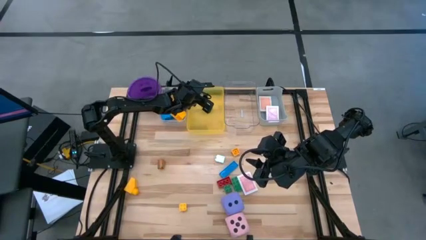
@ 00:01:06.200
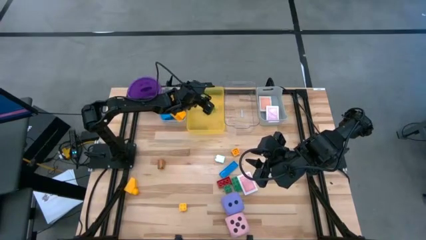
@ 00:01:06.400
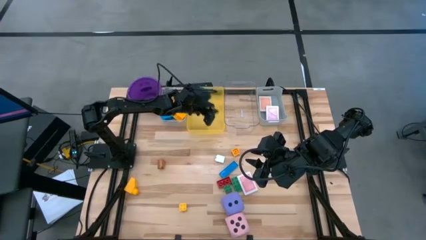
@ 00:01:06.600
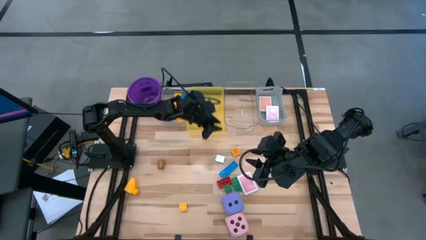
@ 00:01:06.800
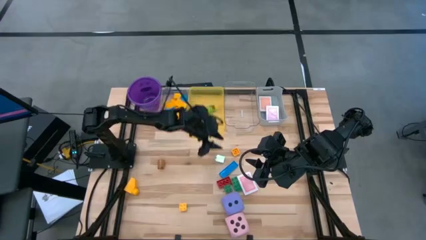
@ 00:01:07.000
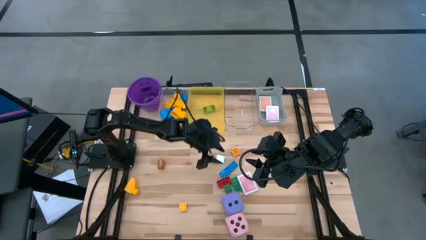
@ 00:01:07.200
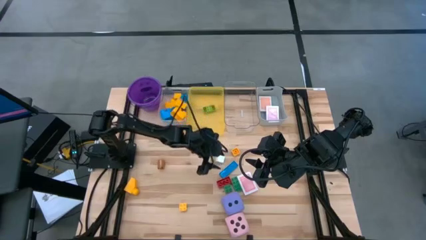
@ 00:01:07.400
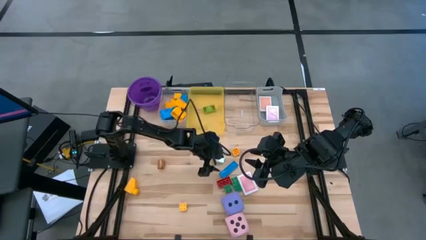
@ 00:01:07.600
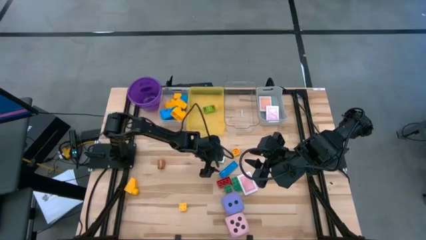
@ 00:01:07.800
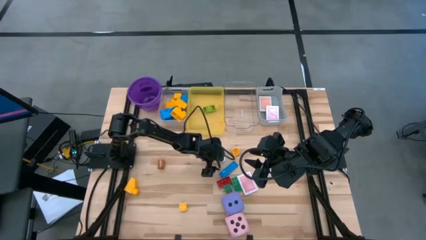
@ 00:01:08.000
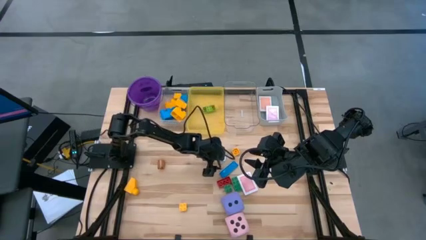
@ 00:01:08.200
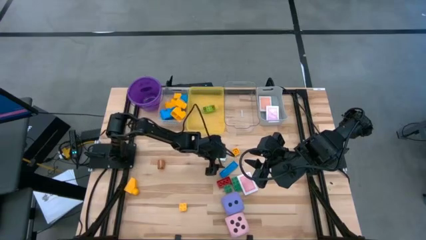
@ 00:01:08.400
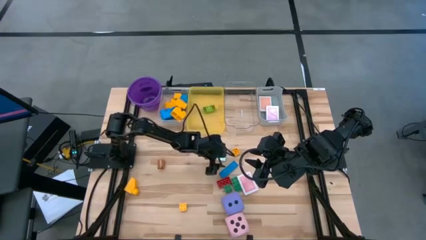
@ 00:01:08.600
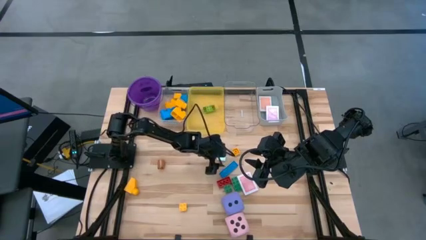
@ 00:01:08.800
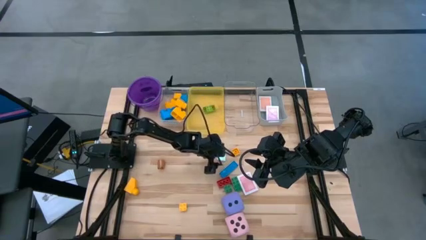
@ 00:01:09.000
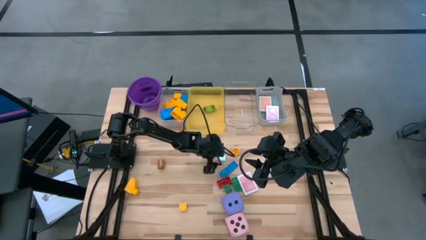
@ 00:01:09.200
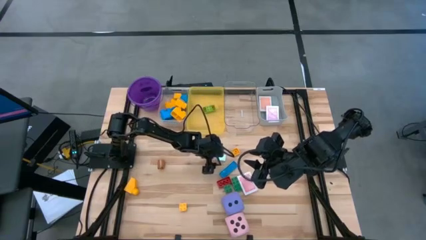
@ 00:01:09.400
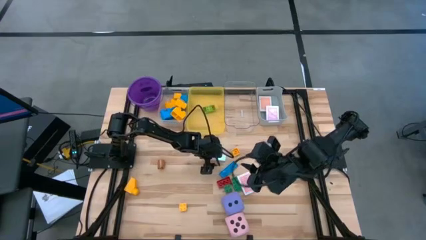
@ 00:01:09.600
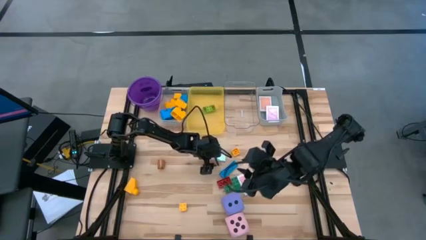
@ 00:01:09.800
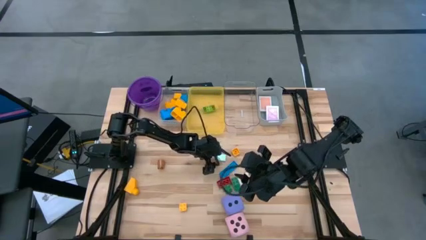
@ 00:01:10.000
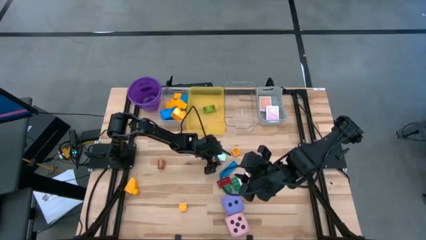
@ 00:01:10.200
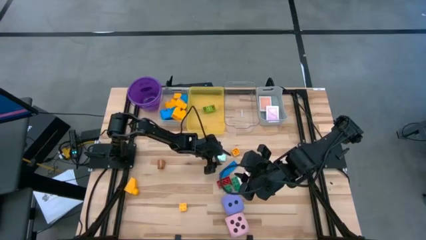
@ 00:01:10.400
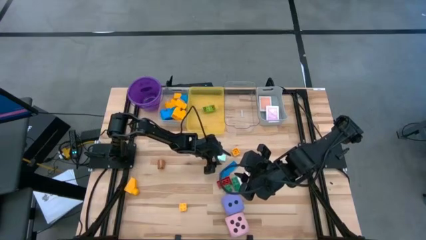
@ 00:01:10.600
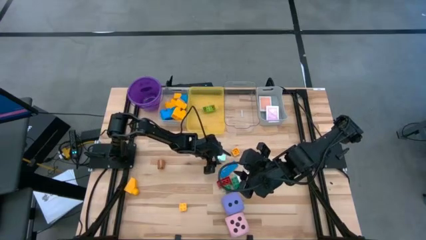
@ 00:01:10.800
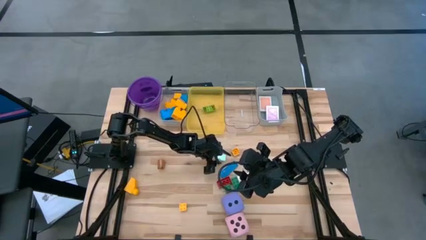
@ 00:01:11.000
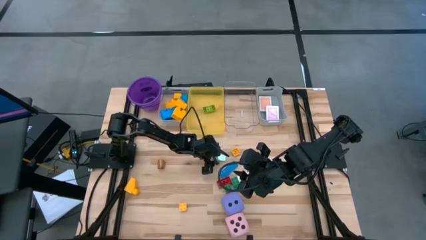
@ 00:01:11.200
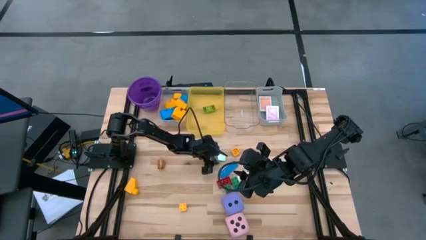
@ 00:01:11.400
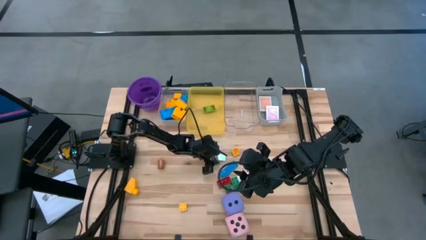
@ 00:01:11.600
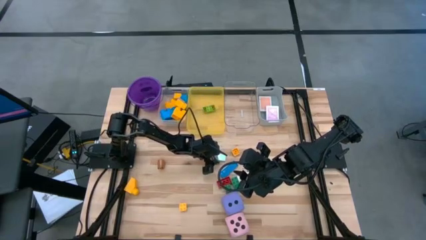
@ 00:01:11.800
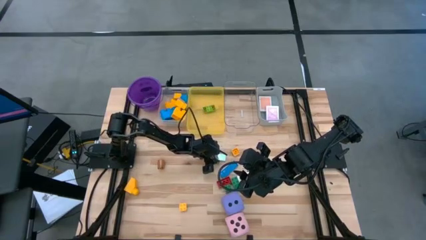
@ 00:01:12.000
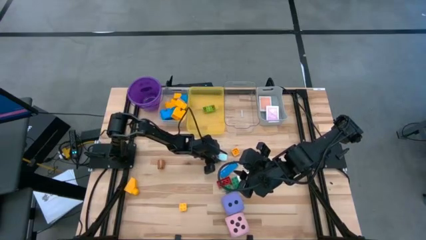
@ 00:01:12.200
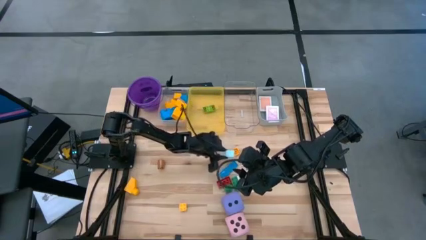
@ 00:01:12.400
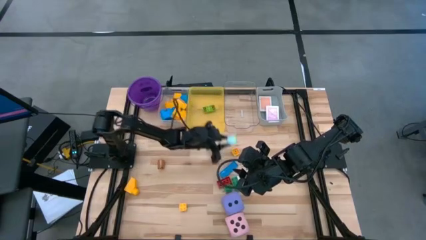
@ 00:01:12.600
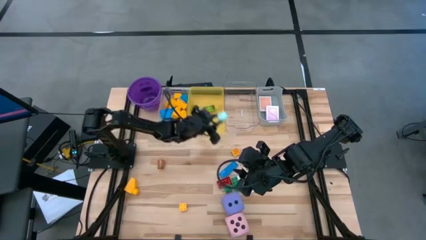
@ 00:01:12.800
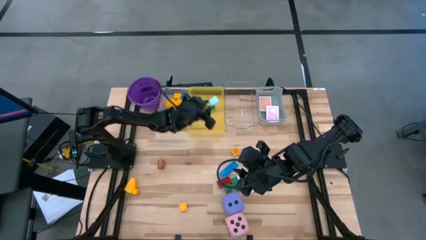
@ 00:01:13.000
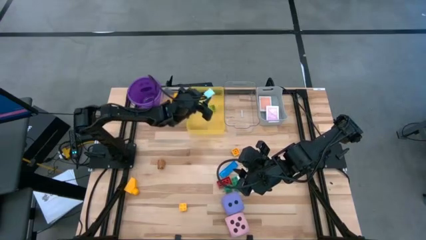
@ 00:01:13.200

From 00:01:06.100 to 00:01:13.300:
Task: Pick & Place Toys
Put the small light blue game piece into the yellow bin

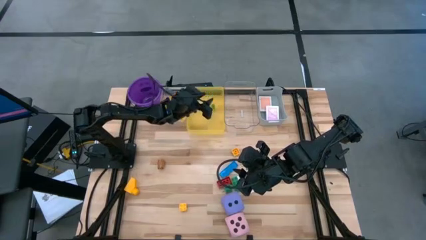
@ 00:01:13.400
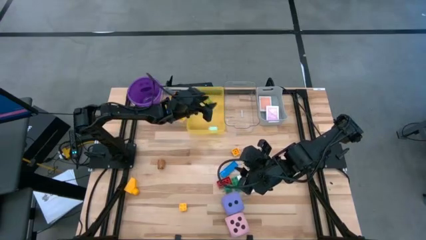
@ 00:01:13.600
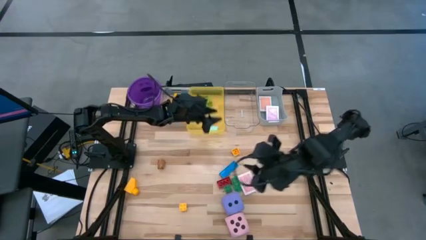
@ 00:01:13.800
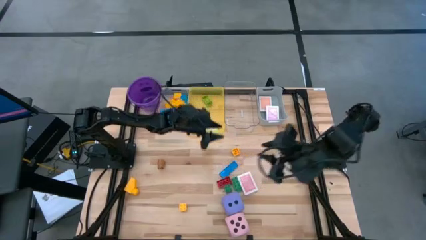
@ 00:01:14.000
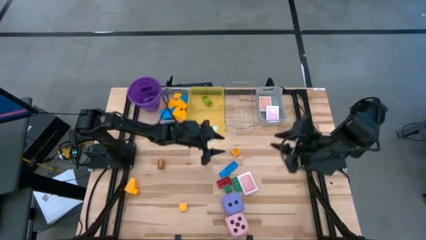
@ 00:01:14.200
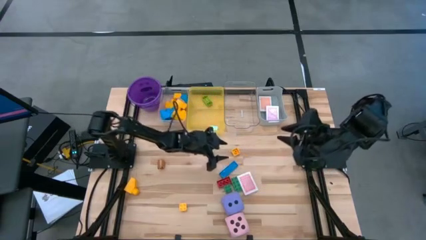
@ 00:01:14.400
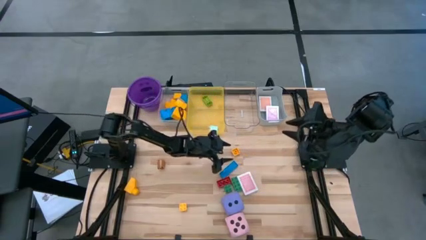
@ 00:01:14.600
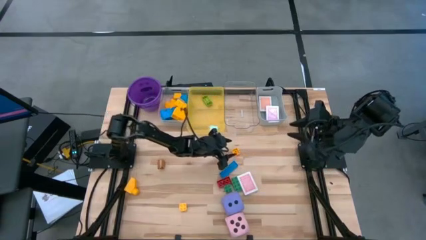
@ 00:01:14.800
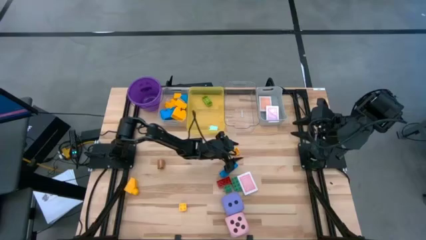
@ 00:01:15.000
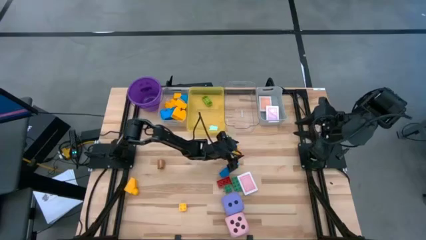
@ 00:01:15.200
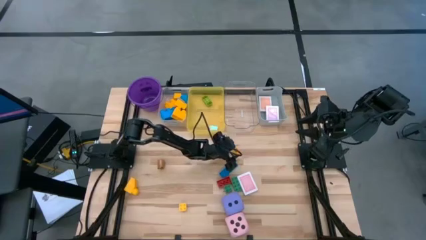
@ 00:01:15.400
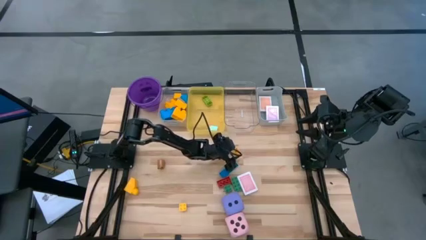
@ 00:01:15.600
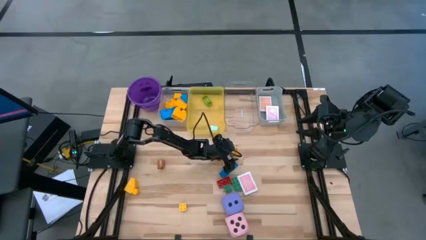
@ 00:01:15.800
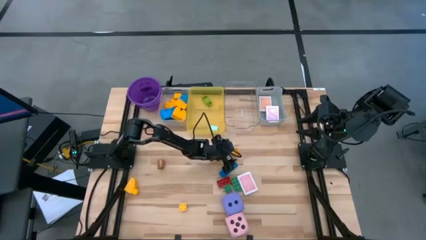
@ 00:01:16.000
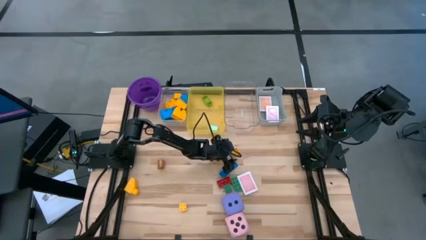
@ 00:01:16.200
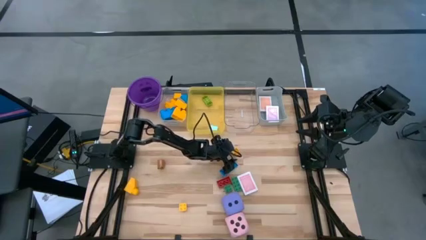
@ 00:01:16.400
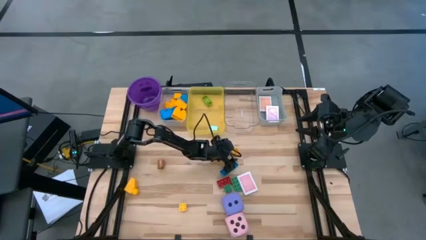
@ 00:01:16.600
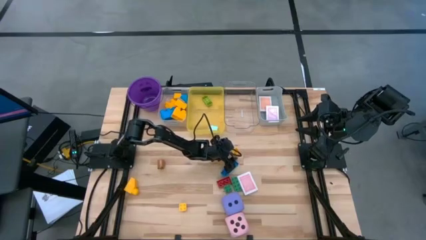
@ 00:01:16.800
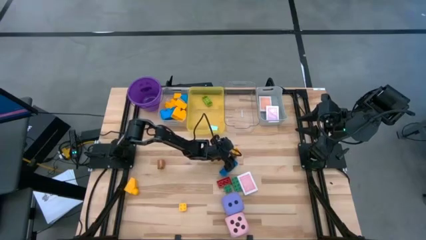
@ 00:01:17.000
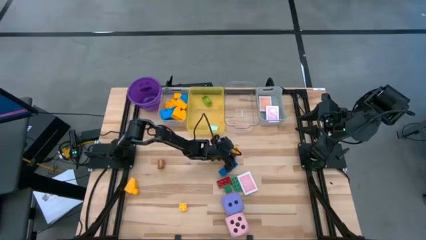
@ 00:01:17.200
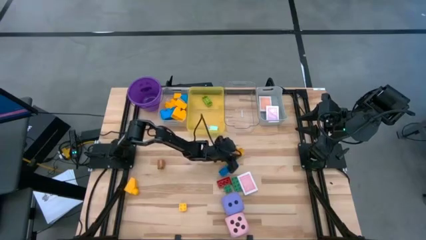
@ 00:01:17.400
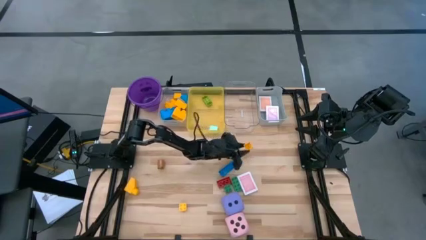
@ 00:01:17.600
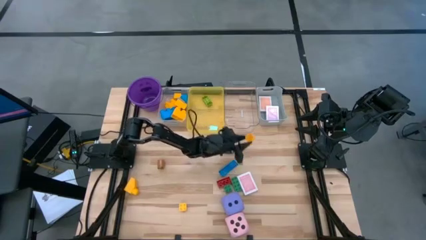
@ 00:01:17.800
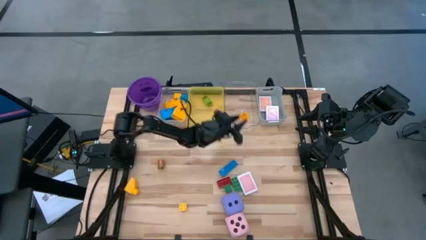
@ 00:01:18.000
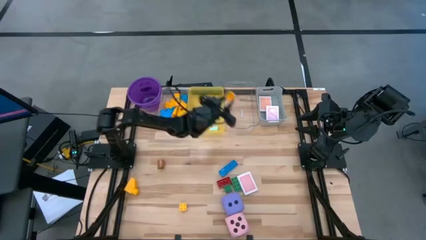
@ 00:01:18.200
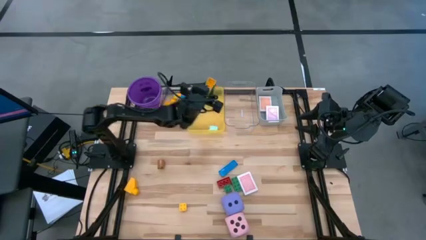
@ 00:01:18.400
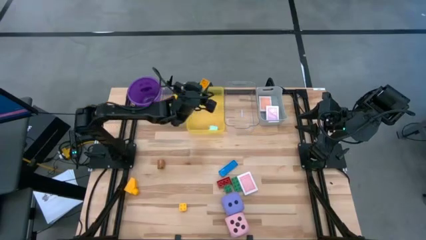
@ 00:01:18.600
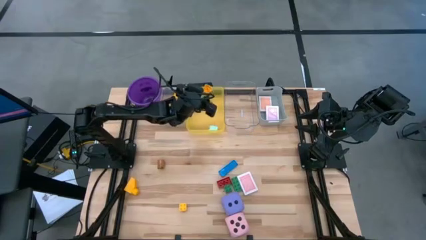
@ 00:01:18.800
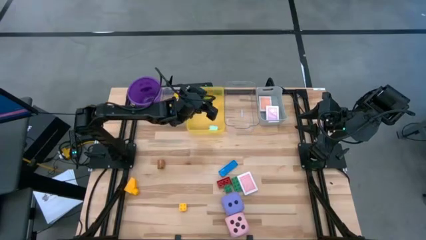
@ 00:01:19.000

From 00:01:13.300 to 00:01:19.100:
Put the small yellow game piece into the yellow bin

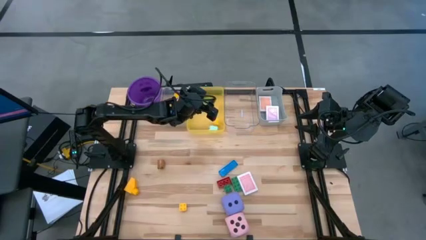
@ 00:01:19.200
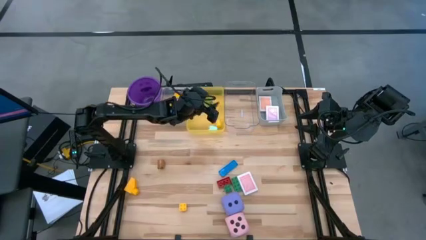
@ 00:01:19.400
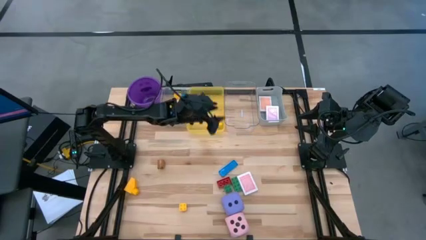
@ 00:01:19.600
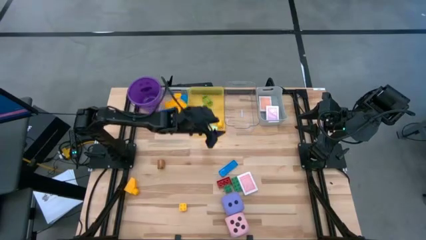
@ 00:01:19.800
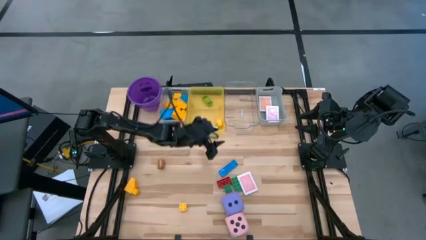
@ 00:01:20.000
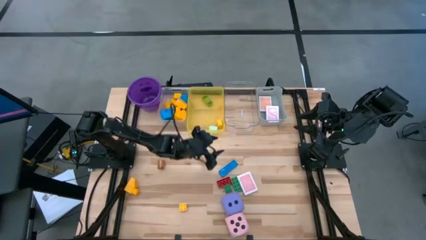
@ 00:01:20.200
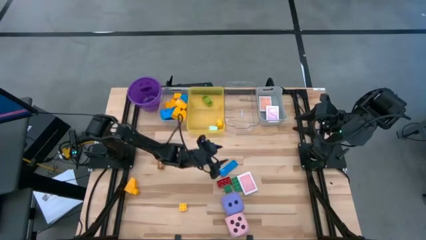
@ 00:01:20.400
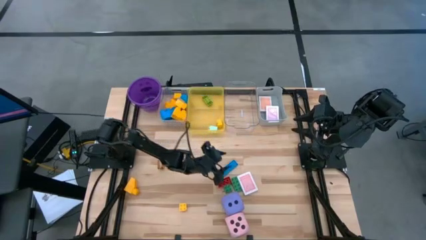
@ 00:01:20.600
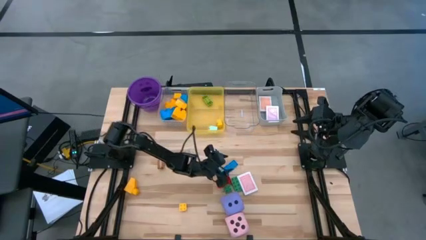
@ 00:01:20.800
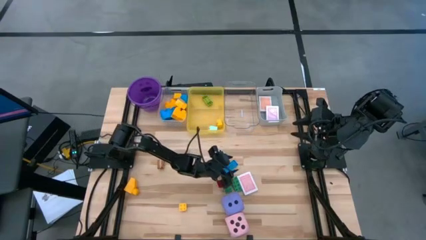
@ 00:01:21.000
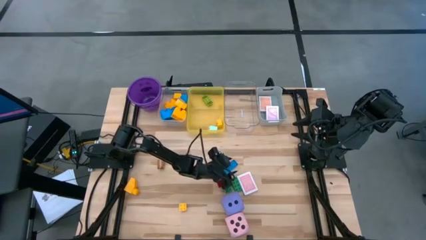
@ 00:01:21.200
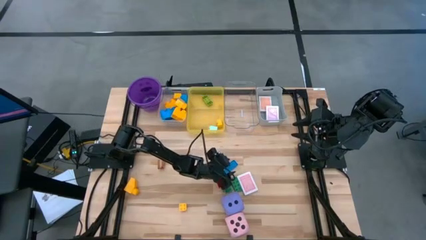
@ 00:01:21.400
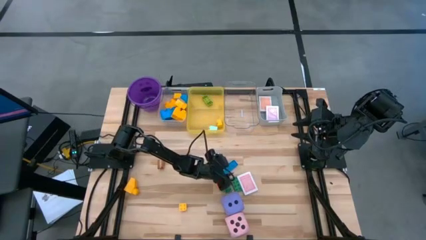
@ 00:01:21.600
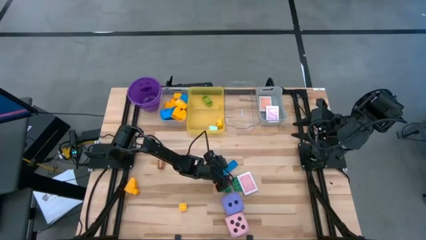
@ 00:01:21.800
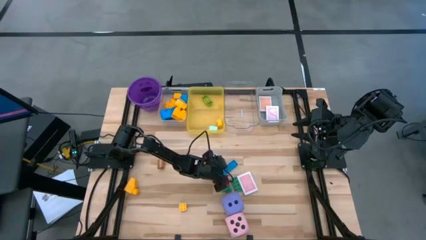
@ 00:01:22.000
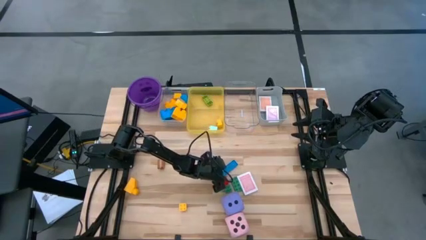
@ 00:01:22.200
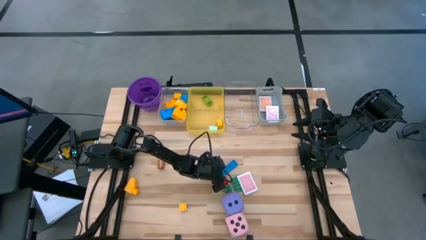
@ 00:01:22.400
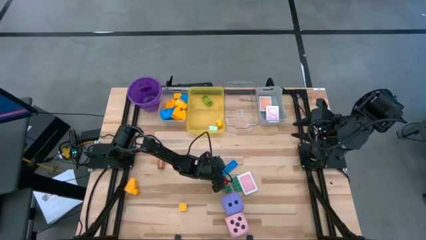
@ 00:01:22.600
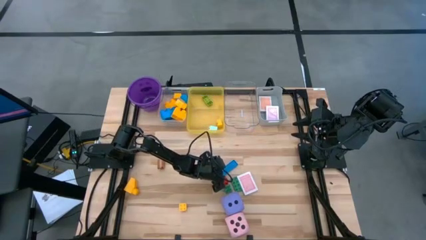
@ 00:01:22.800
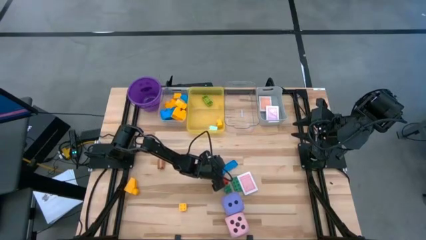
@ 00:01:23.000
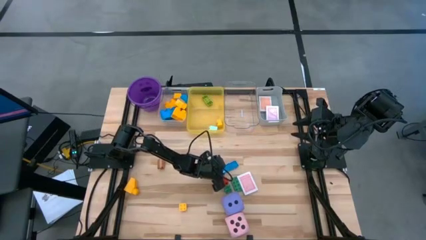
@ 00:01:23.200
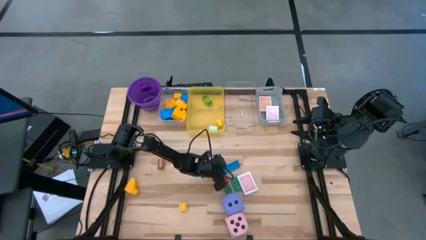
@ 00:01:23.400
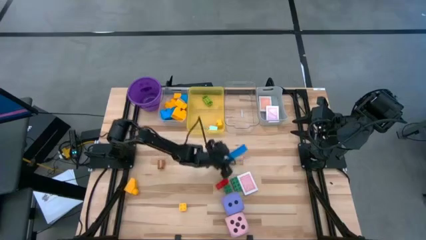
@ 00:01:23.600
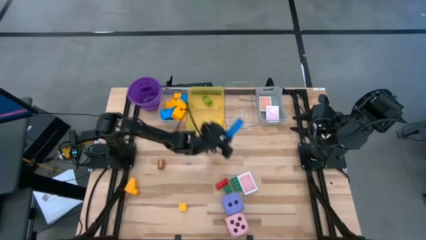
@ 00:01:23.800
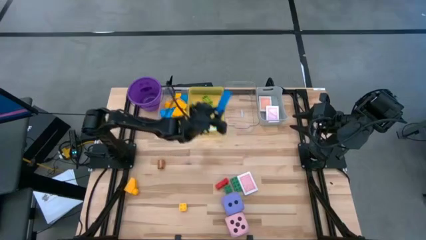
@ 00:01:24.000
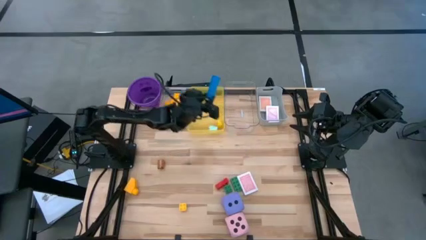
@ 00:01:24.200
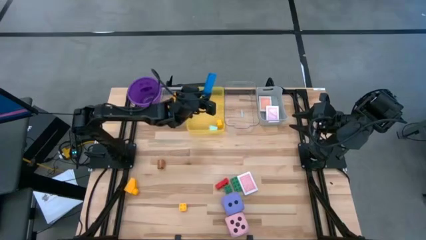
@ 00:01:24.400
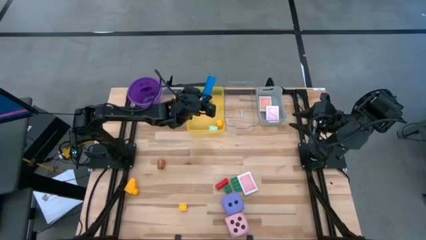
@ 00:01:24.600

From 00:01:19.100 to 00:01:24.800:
Put the small blue game piece into the yellow bin
